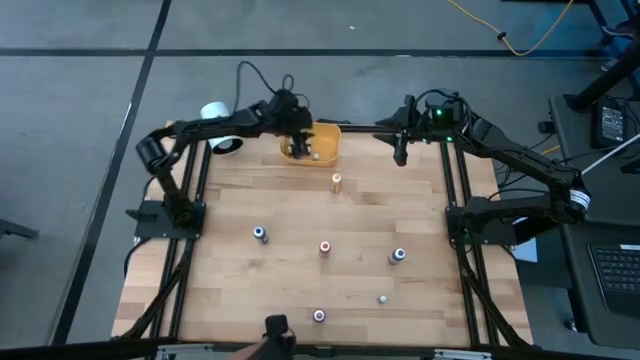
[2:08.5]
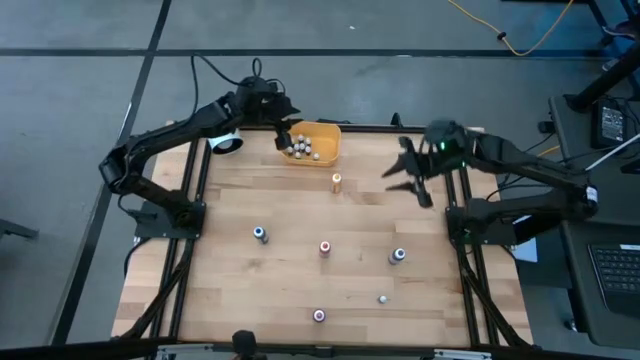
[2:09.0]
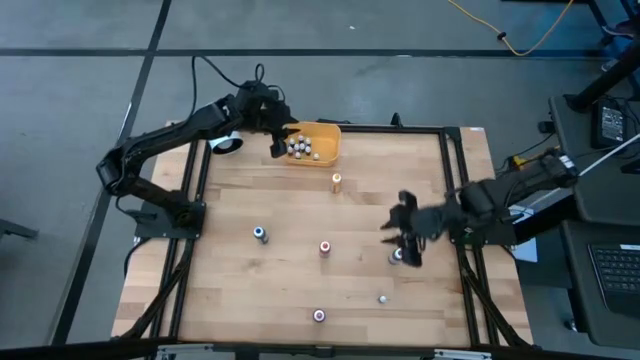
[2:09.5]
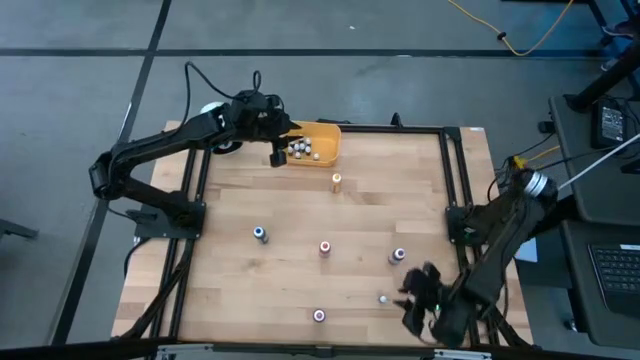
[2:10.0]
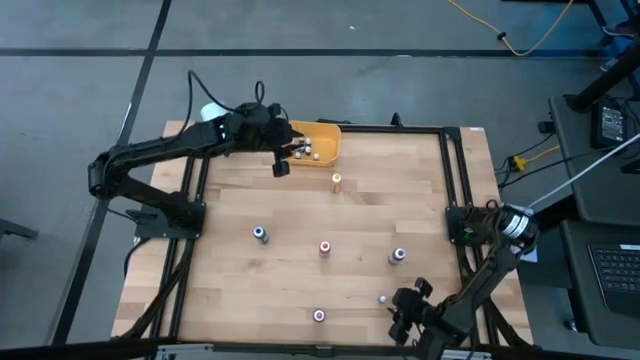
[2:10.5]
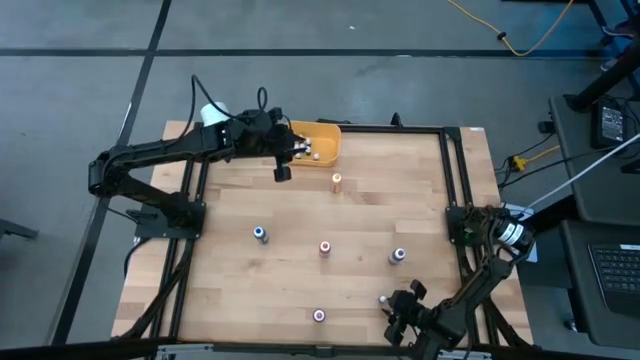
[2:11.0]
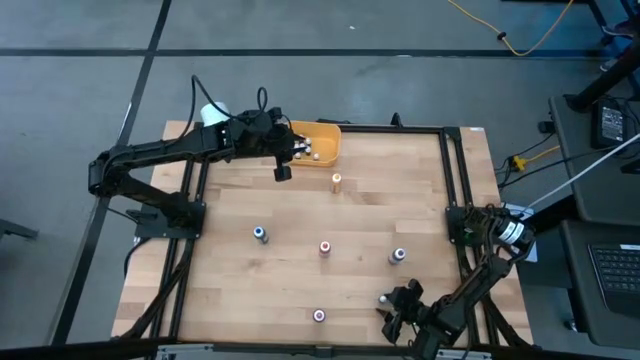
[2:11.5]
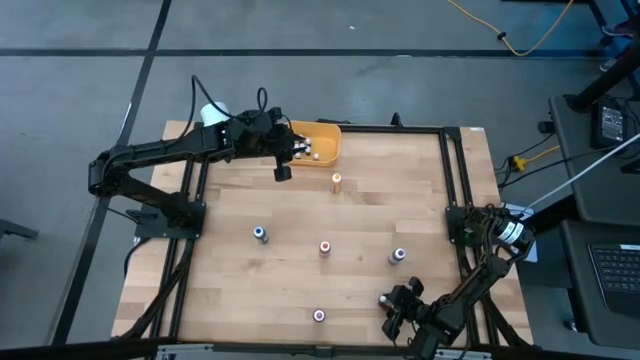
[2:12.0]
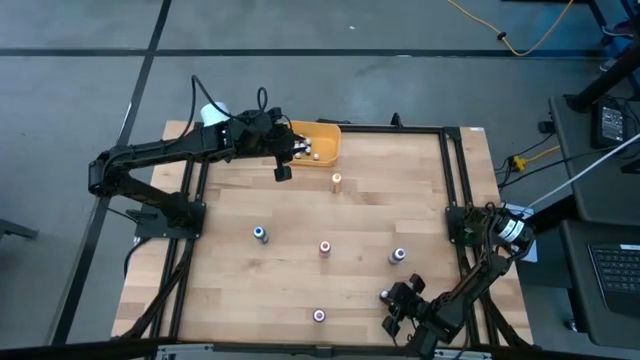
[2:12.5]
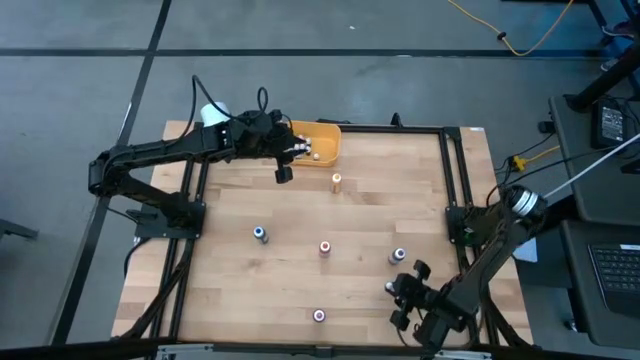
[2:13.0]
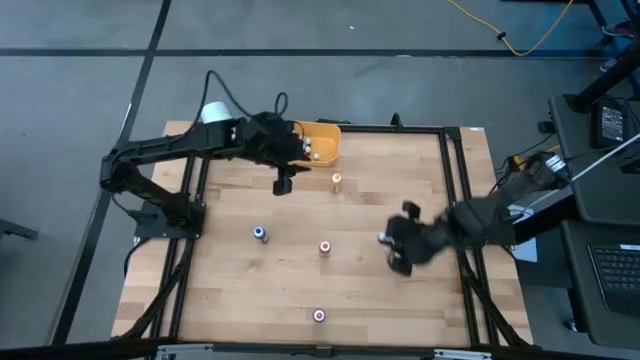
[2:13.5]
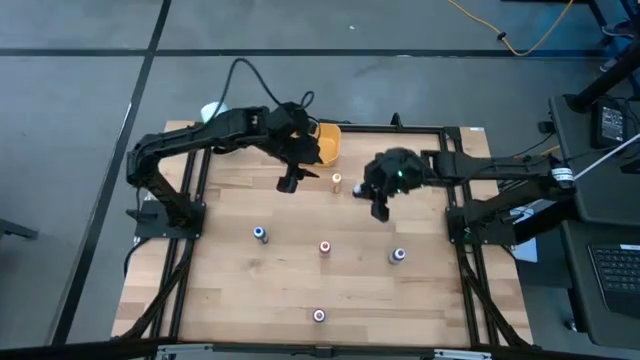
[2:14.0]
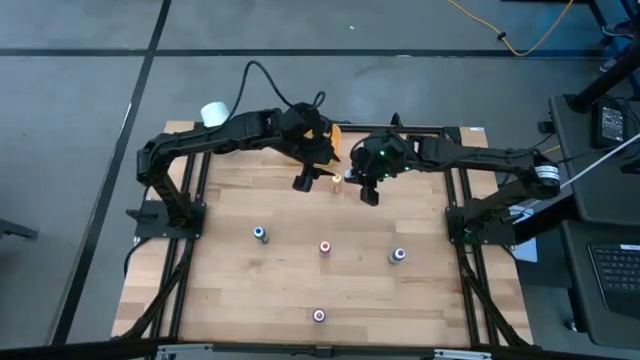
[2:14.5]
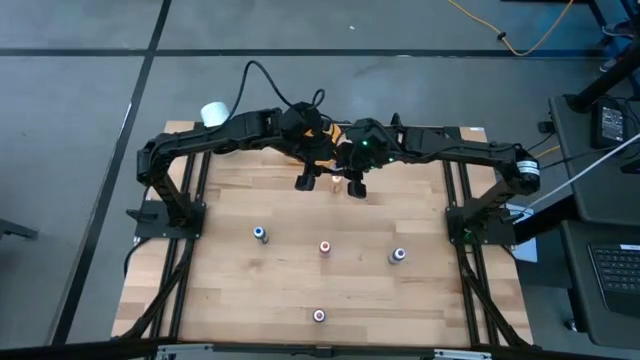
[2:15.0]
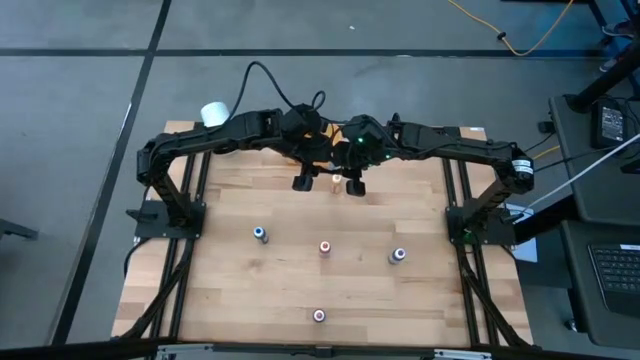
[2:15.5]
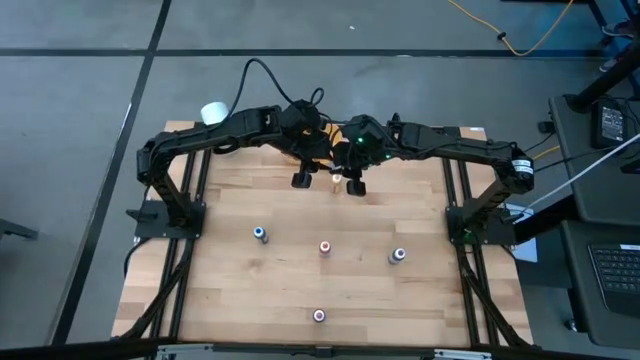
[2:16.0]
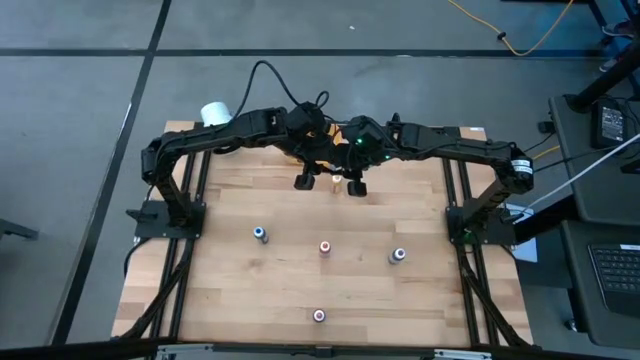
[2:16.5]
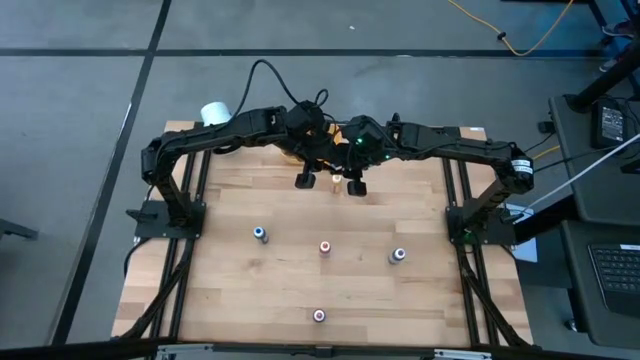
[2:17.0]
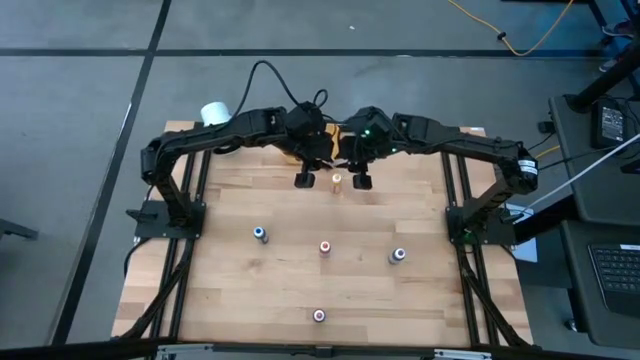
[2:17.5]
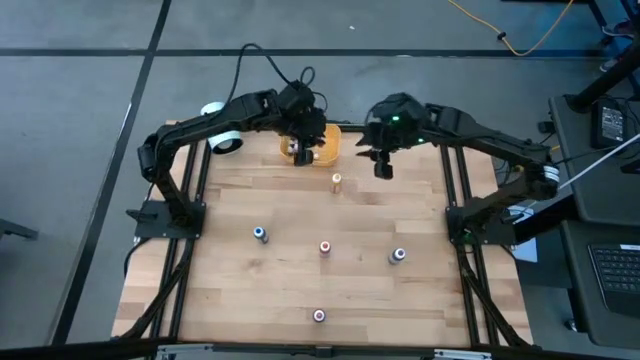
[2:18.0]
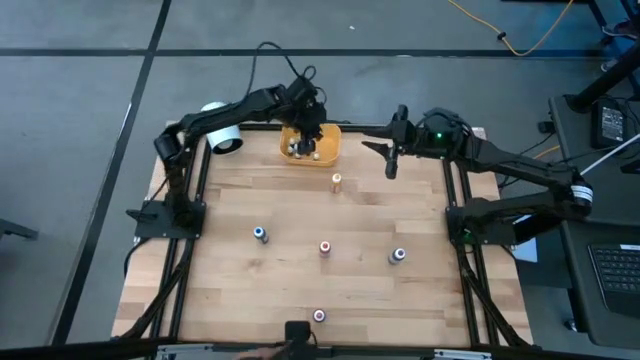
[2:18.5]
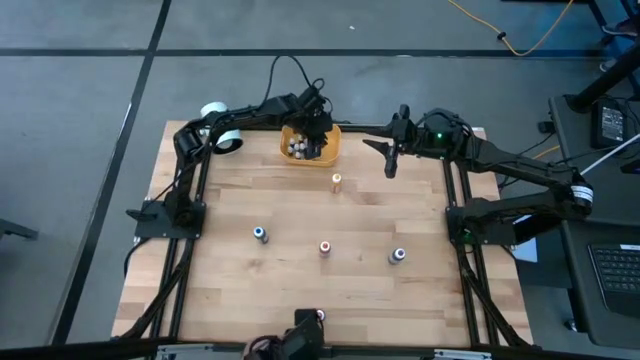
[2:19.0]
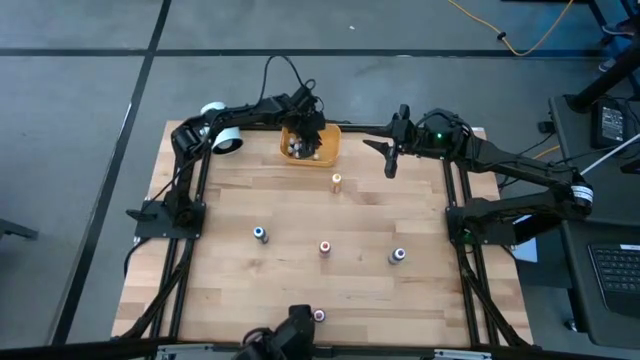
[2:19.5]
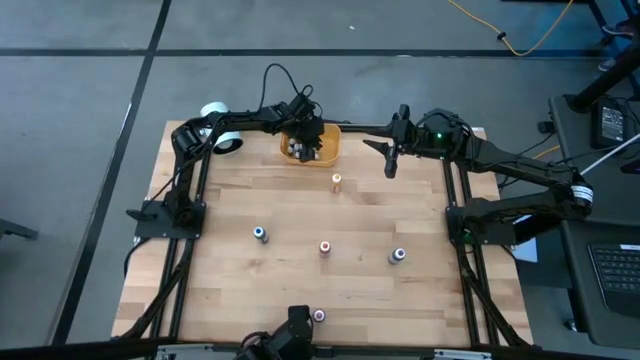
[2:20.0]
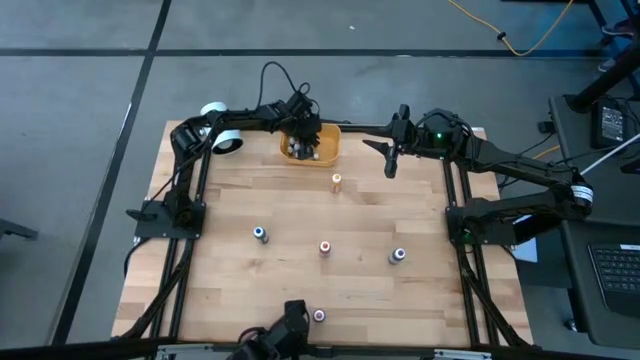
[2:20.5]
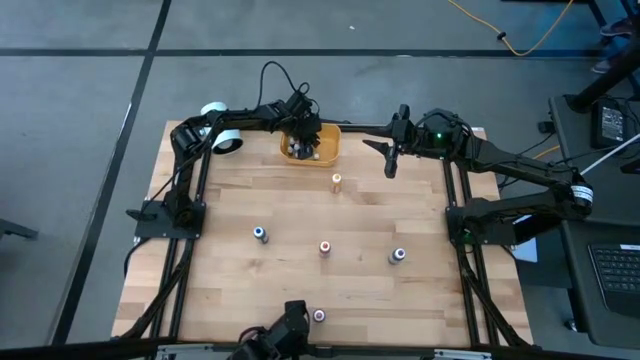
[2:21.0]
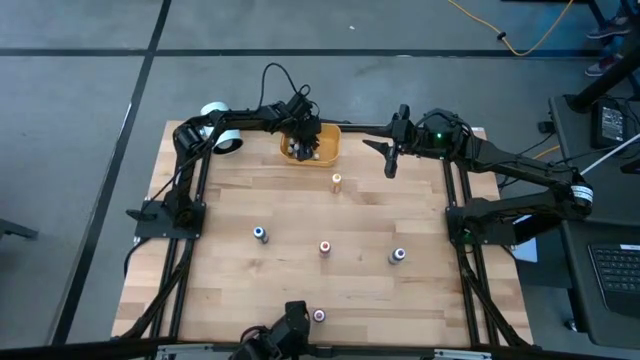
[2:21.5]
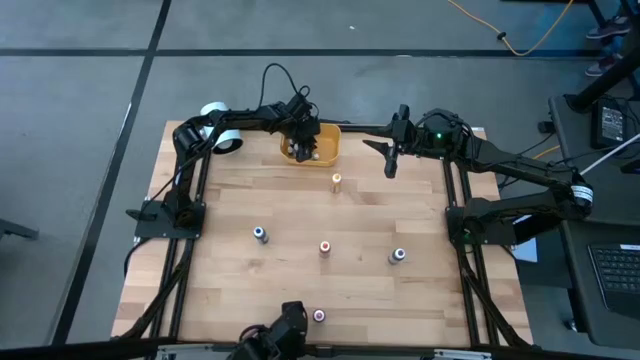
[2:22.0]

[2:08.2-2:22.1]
Task: Pick & Place food coloring
Put the small orange food coloring bottle into the yellow bin

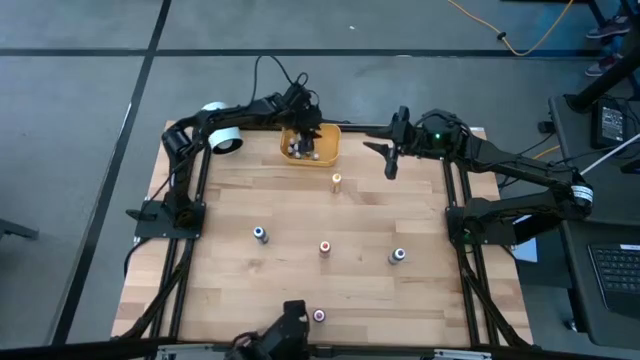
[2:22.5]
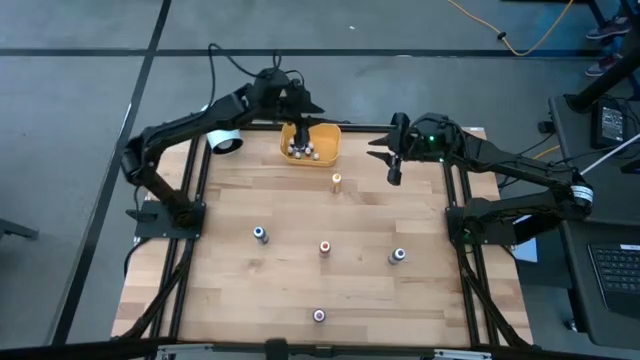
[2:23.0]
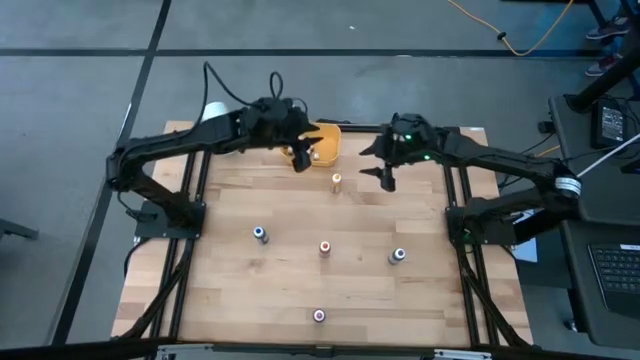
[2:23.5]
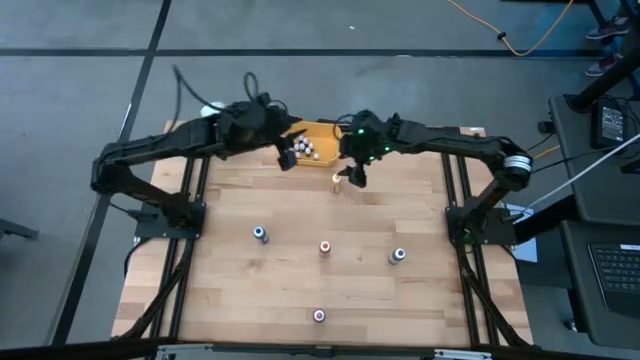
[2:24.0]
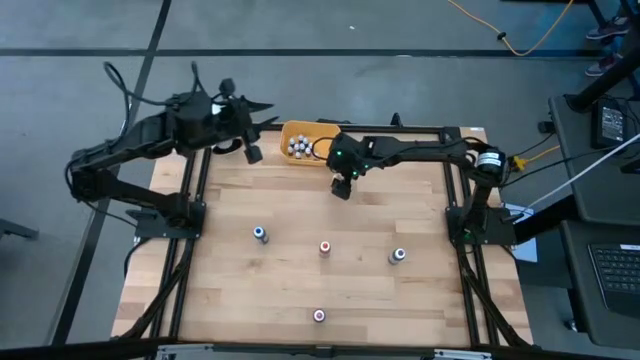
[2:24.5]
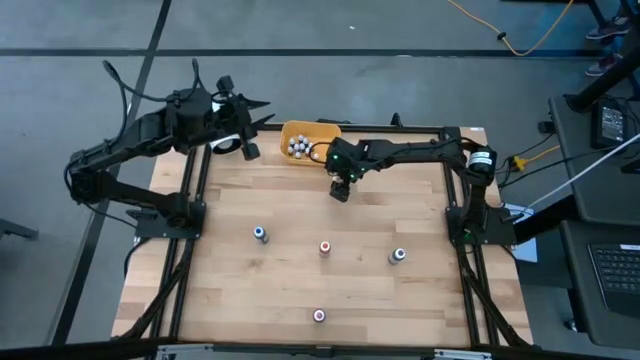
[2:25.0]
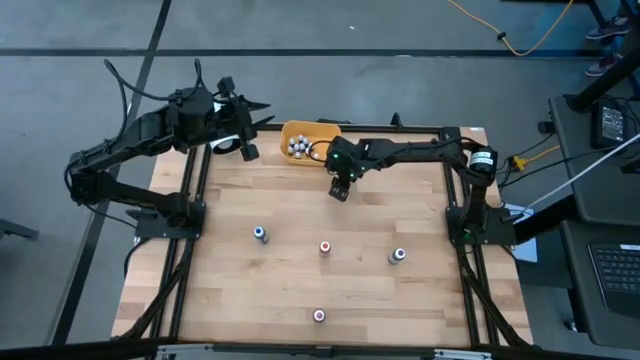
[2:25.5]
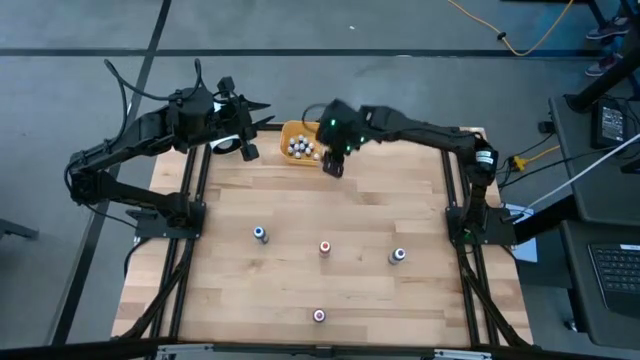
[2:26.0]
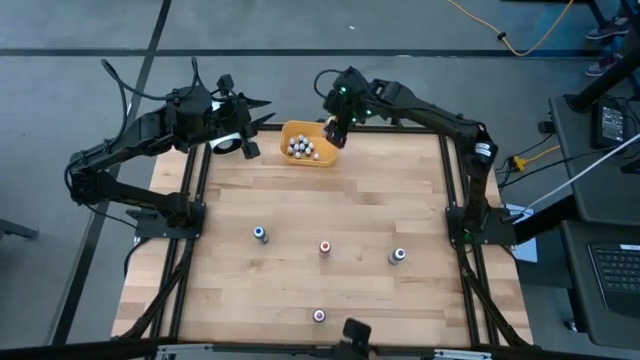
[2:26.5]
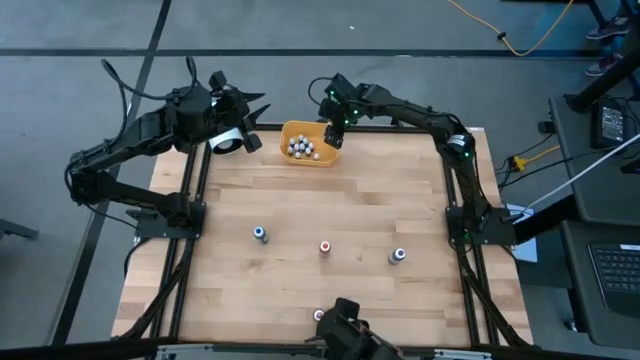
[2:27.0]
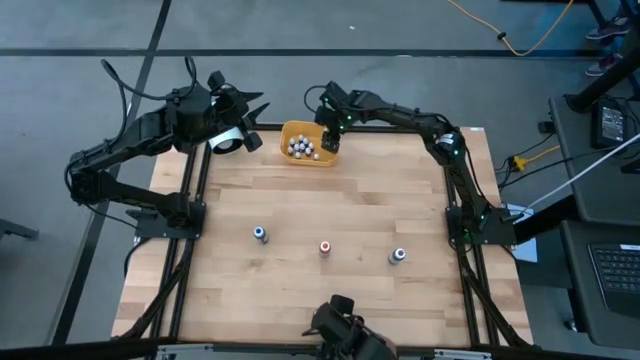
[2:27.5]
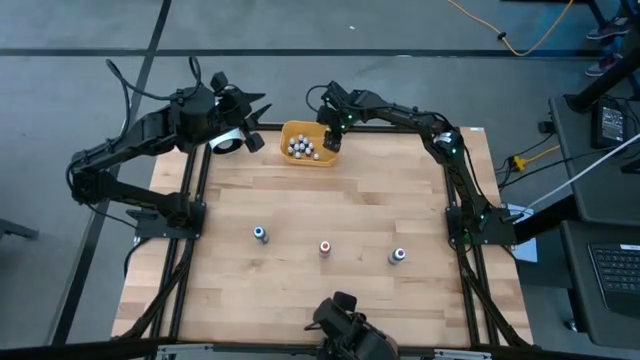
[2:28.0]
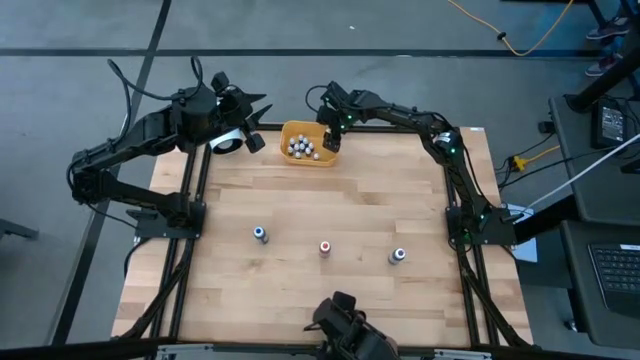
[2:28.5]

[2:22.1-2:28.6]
Put the yellow food coloring bottle into the yellow bin
